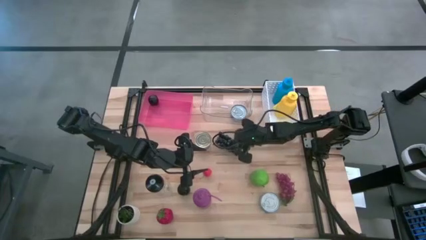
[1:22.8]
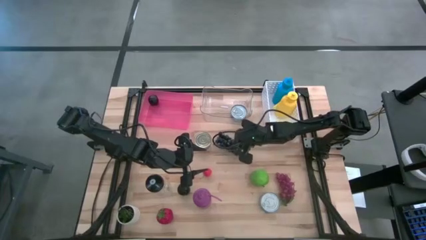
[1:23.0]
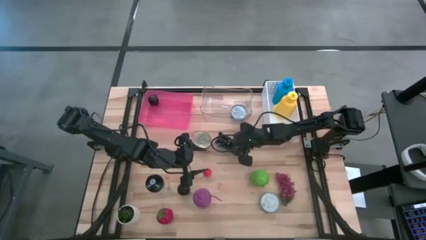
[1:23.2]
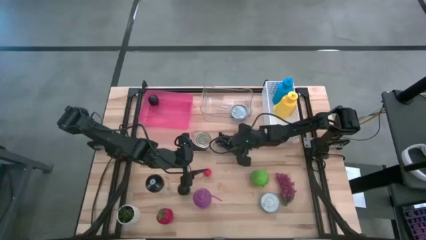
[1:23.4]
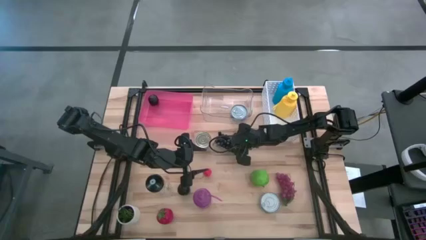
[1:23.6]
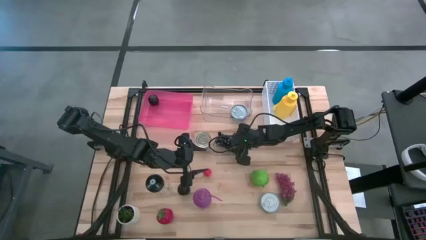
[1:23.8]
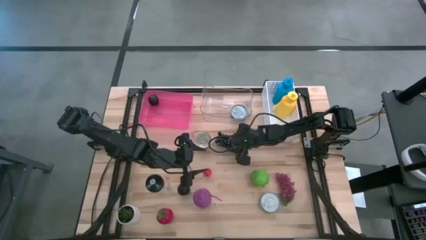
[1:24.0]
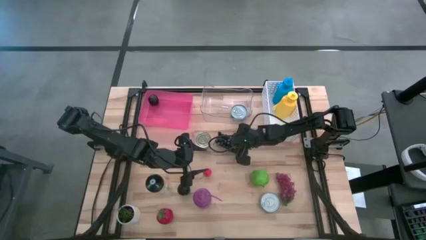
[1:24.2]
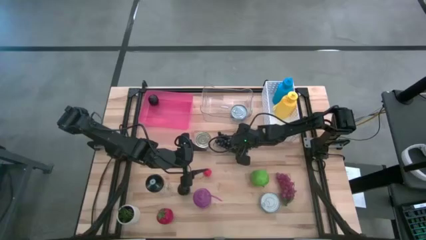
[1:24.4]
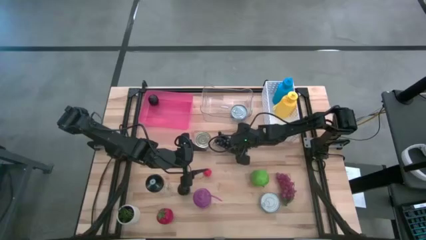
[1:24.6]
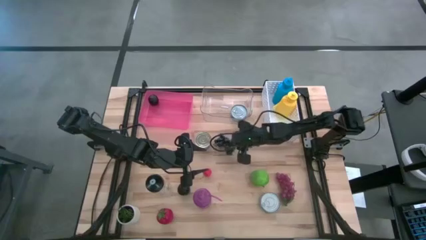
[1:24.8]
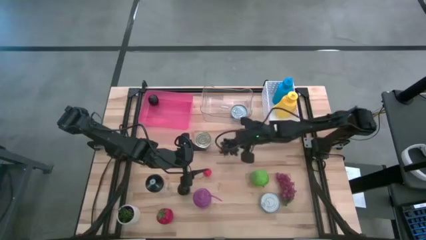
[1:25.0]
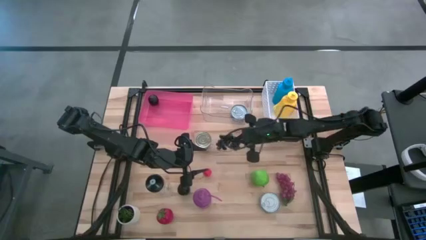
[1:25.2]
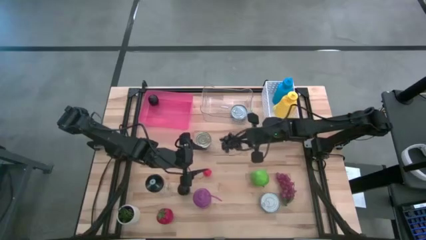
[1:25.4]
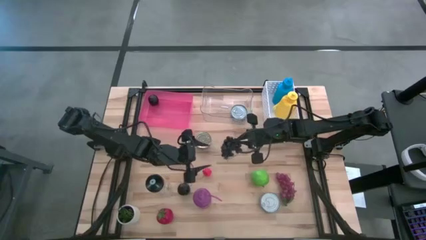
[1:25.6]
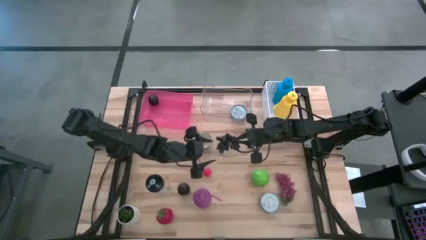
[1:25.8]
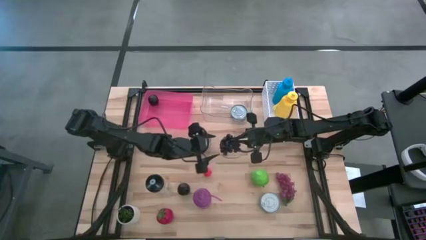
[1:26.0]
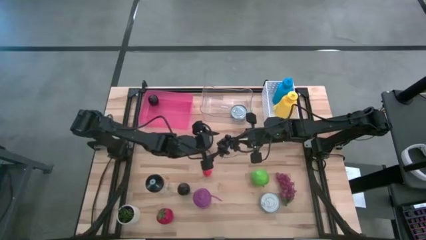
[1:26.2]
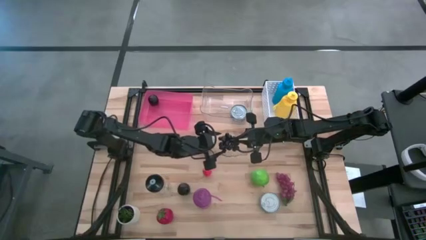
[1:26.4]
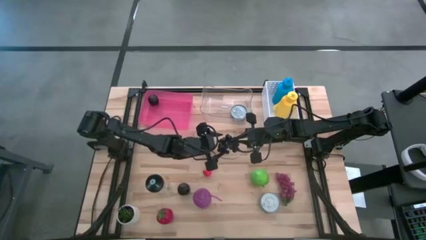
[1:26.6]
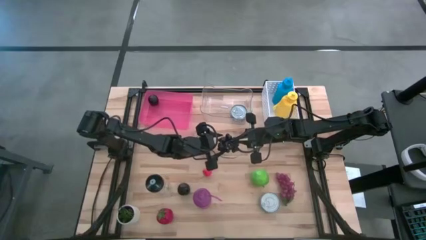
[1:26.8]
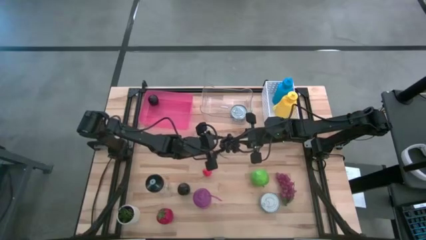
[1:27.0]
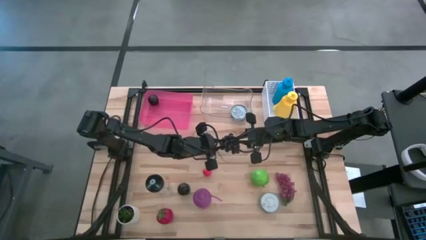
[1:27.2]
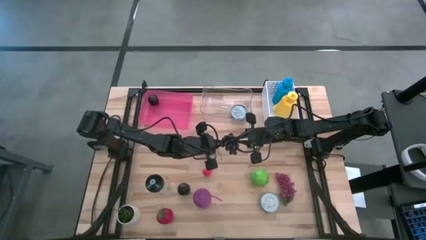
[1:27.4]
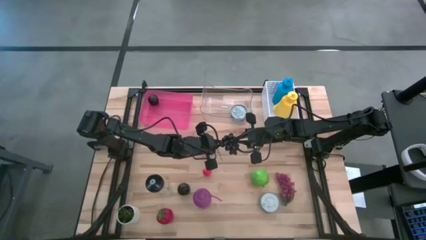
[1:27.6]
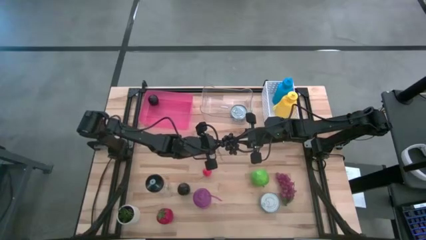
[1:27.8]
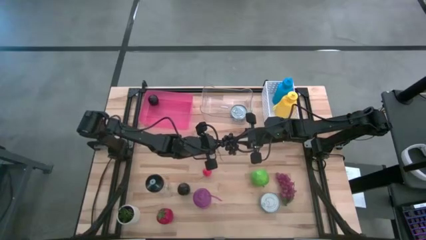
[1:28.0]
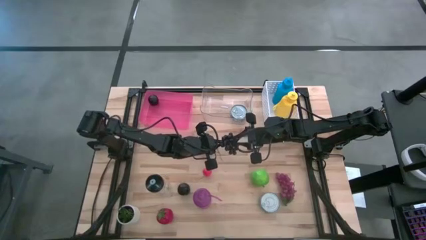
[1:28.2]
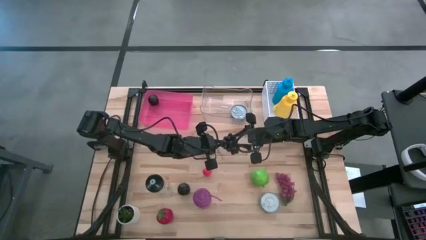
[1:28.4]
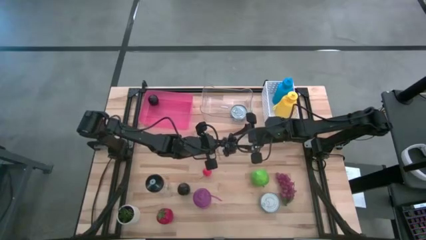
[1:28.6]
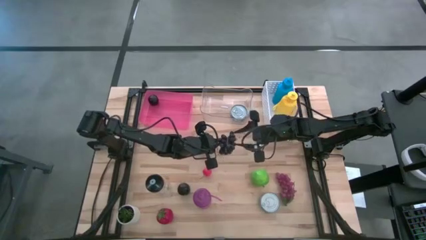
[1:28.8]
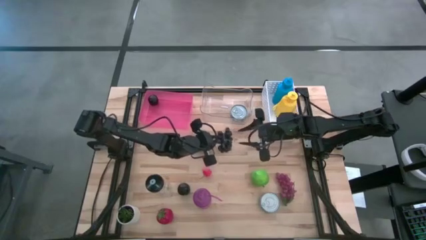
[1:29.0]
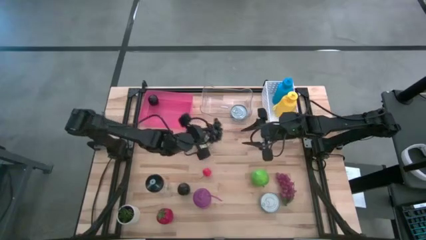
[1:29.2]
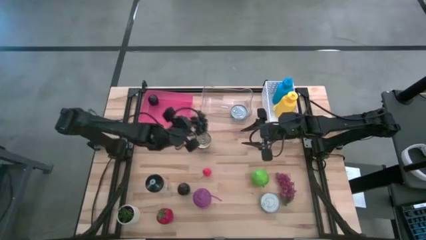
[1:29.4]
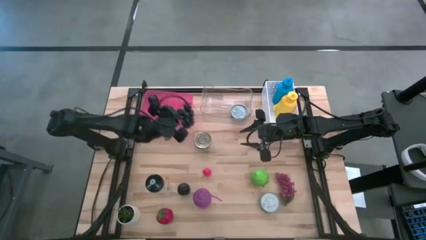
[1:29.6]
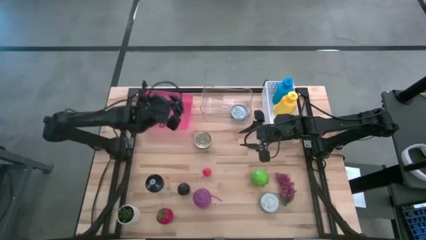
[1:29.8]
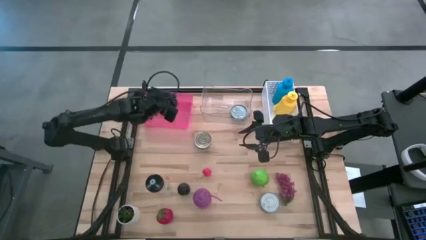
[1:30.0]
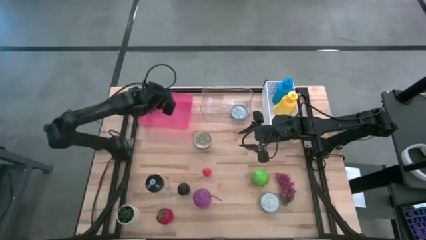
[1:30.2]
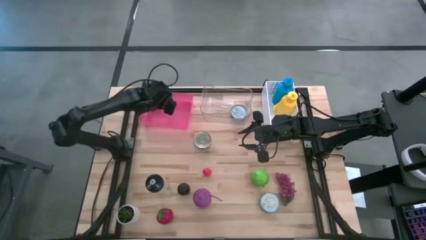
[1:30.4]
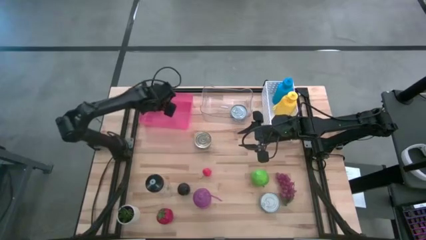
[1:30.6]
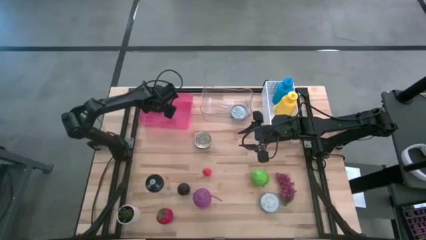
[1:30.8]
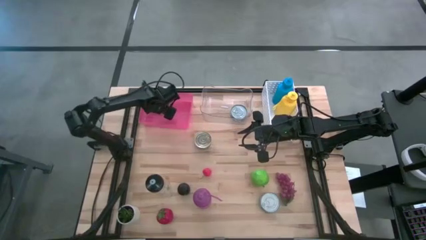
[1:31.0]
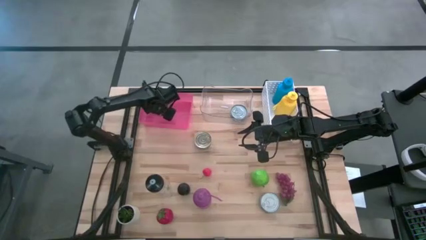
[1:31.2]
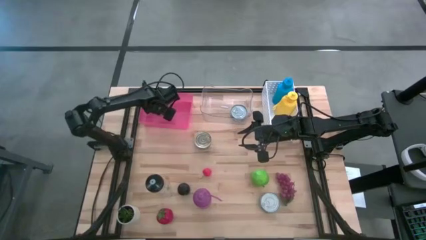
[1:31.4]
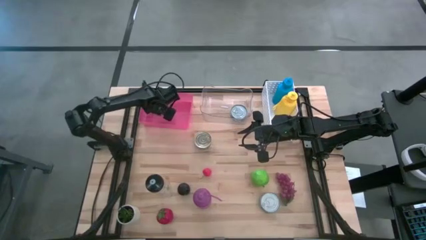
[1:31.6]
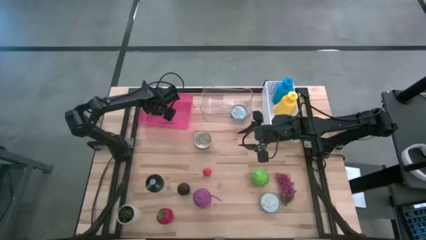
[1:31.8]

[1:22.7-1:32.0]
Task: Pick & Place Food Item
Put the black grapes into the pink bin

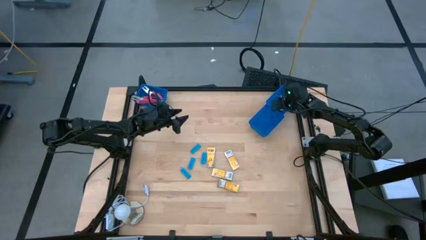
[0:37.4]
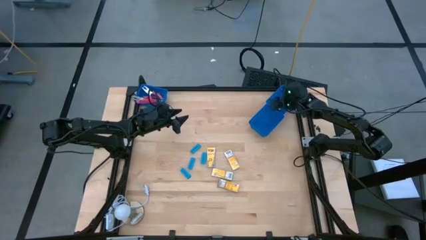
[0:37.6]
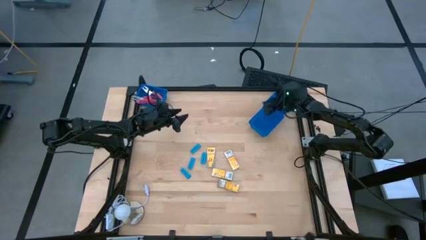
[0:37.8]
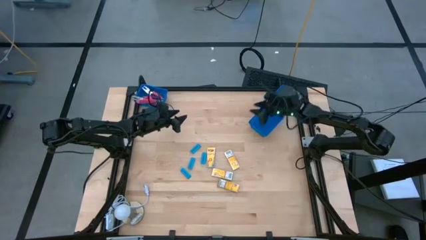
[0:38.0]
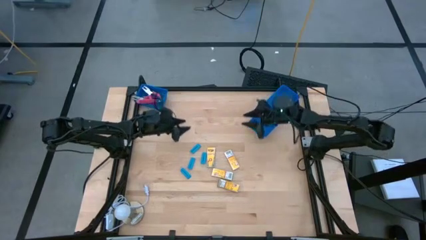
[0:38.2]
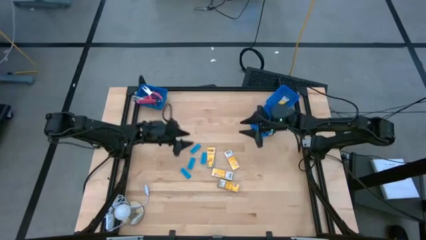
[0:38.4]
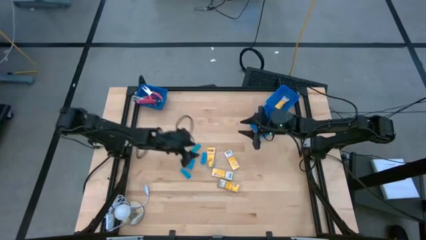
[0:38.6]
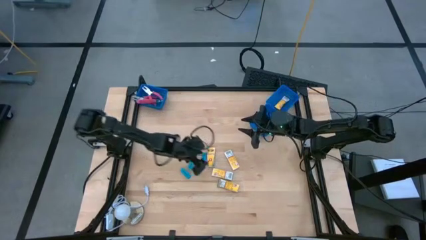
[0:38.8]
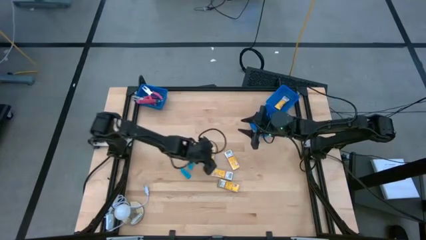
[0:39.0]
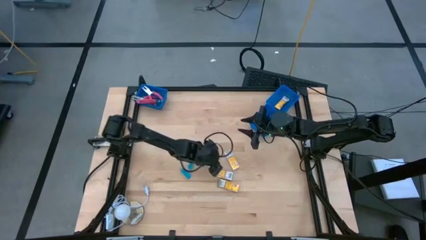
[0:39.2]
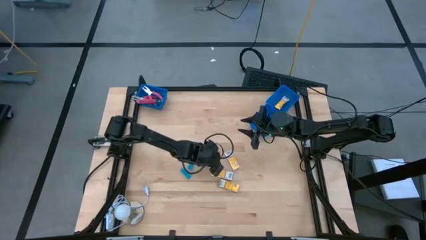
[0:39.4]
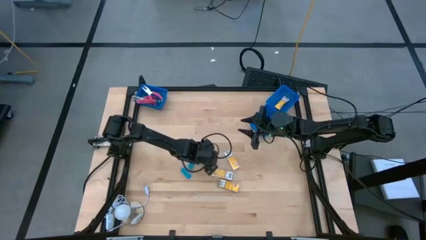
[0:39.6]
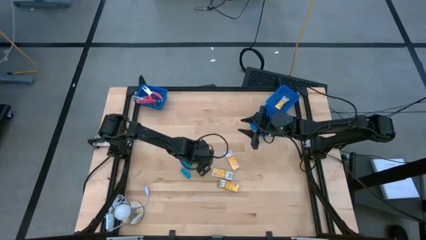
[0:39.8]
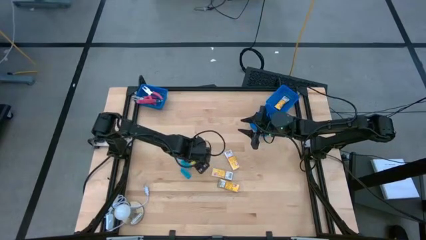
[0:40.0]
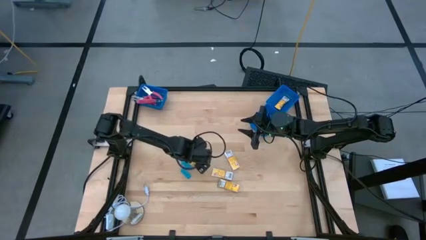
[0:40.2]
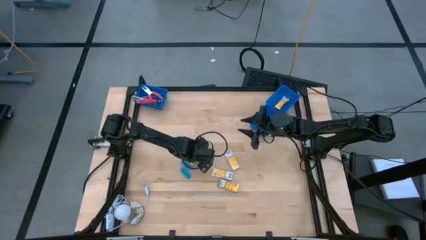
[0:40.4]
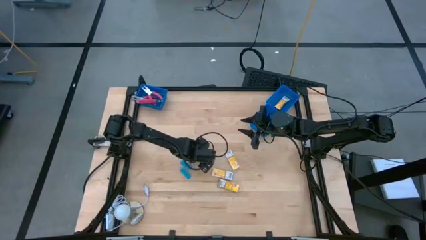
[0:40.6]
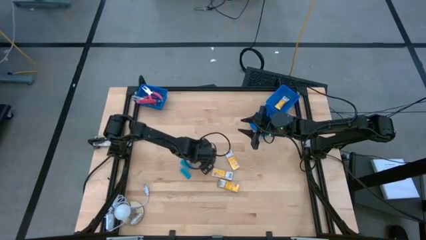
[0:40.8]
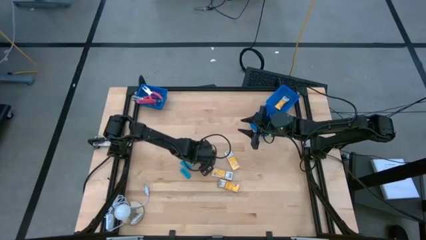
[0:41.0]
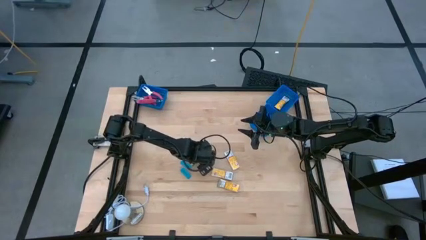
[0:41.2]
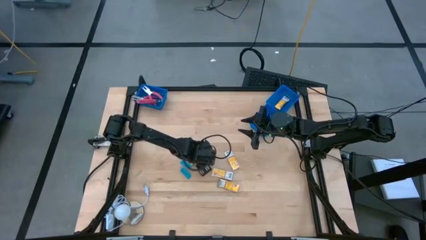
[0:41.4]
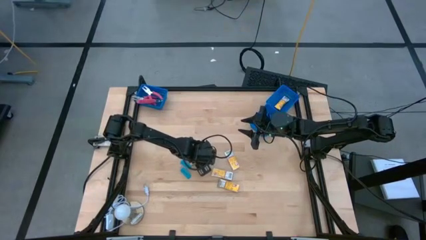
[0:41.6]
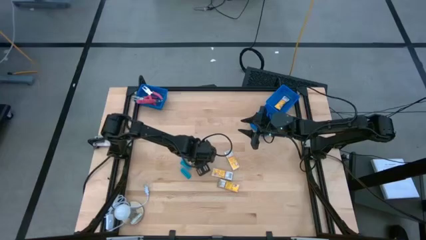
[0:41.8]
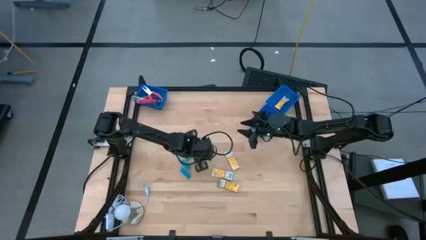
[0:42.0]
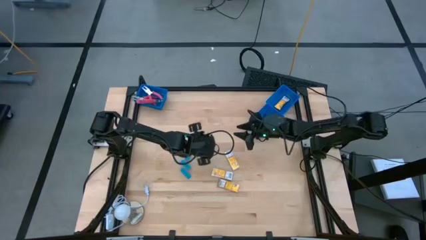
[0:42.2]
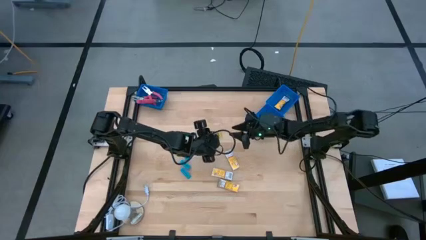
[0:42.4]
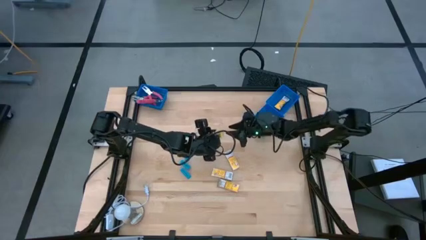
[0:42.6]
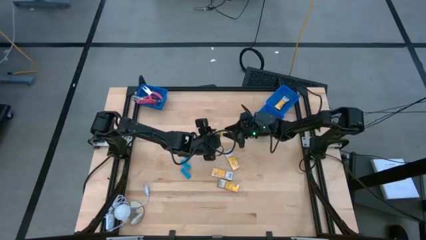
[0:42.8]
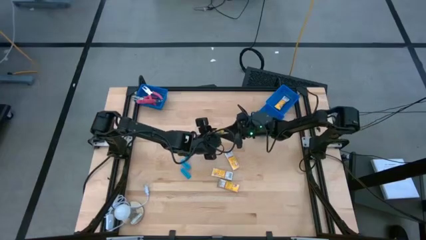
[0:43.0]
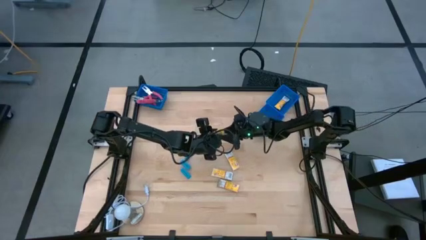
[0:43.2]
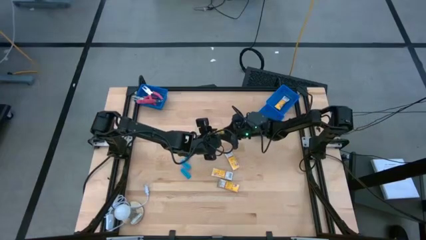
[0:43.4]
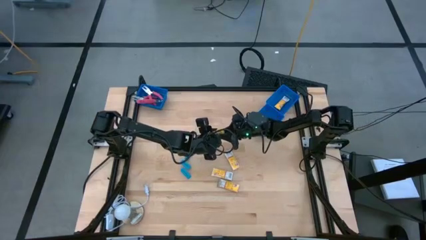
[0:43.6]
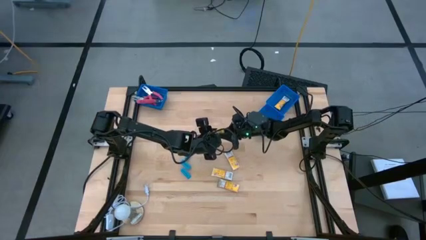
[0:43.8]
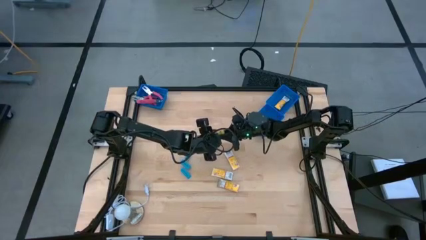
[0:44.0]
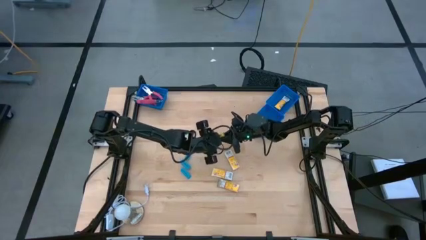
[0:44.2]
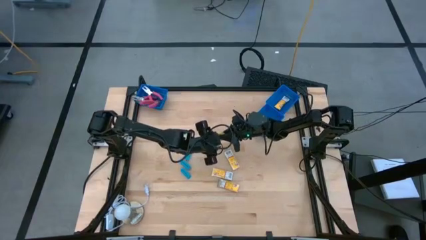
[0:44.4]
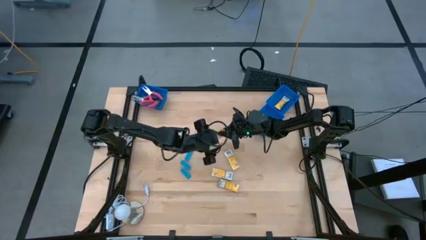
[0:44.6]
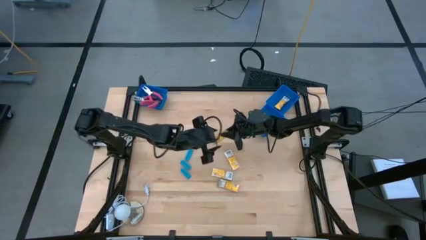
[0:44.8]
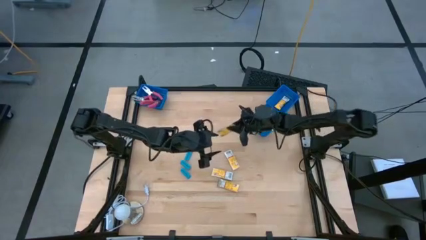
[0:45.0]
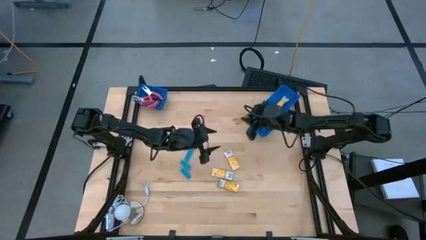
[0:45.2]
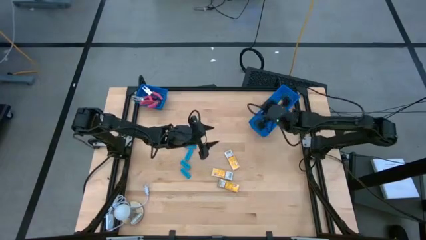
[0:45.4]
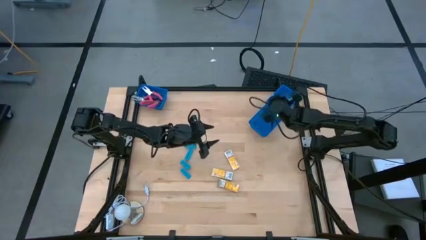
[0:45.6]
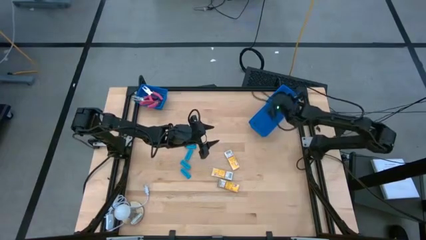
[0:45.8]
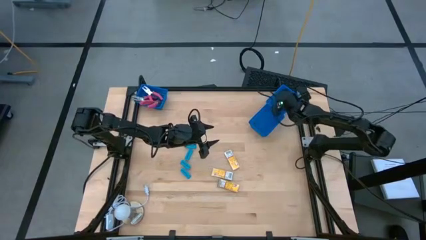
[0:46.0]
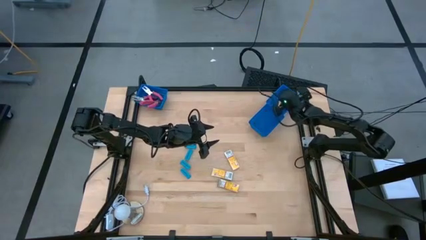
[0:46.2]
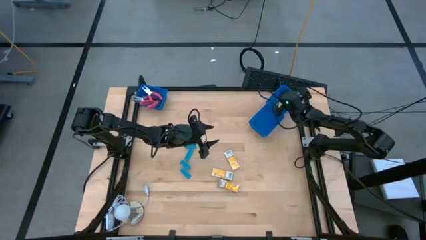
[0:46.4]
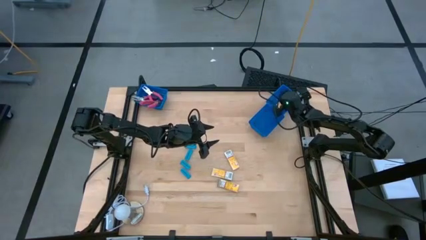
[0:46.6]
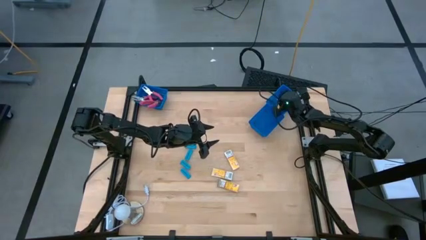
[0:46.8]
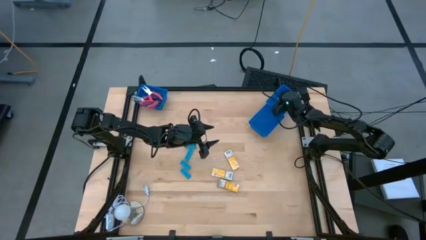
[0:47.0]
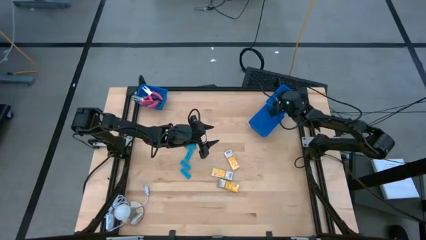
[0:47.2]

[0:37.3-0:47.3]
Task: Pick & Place School Supplies
Put the yellow crayon box into the top right blue basket
